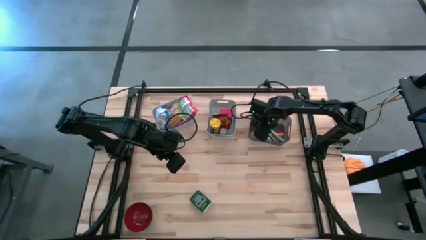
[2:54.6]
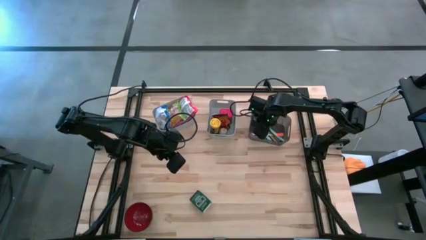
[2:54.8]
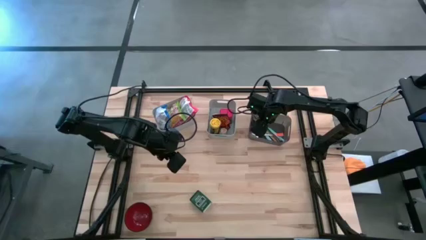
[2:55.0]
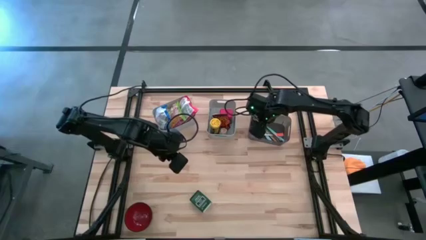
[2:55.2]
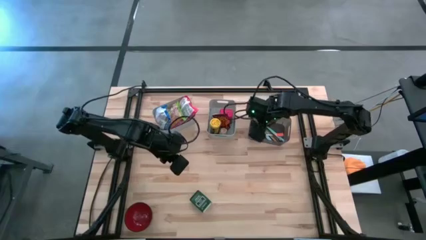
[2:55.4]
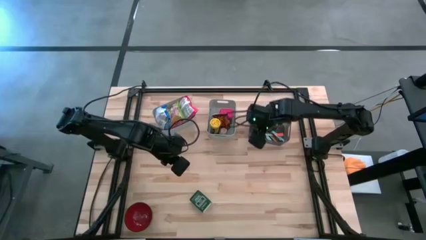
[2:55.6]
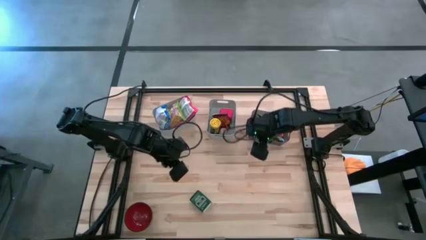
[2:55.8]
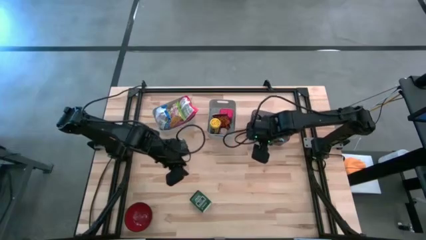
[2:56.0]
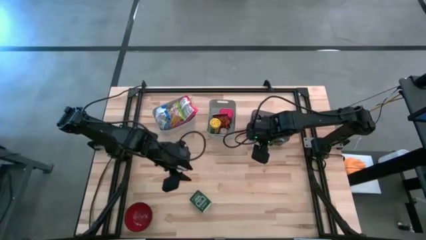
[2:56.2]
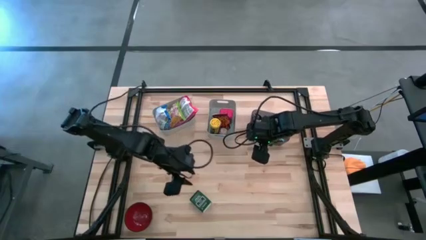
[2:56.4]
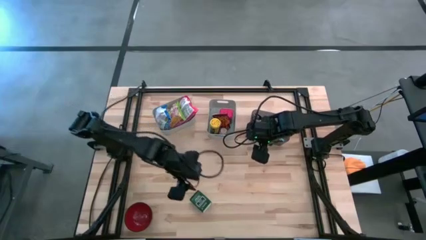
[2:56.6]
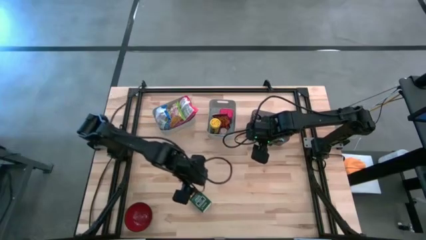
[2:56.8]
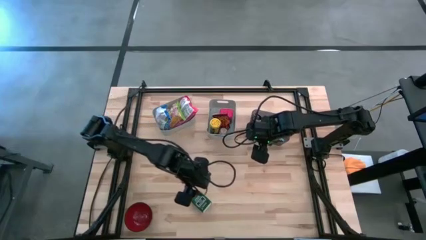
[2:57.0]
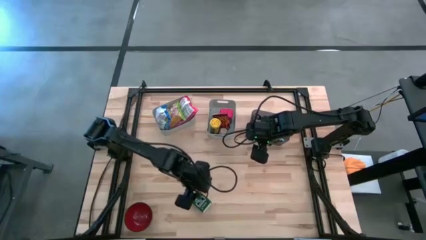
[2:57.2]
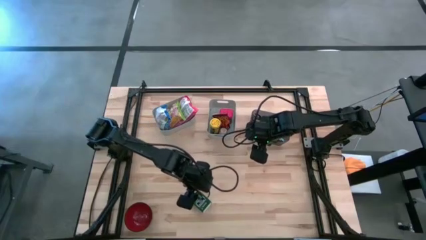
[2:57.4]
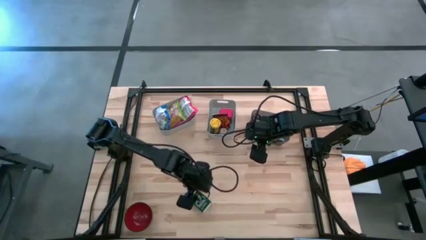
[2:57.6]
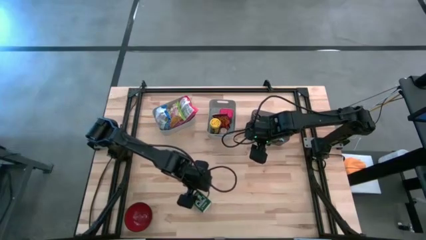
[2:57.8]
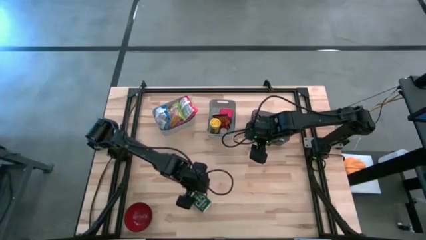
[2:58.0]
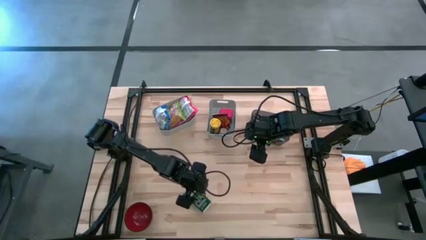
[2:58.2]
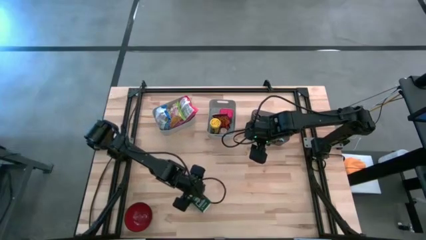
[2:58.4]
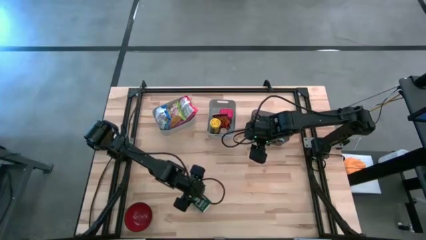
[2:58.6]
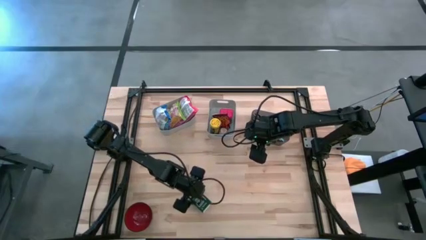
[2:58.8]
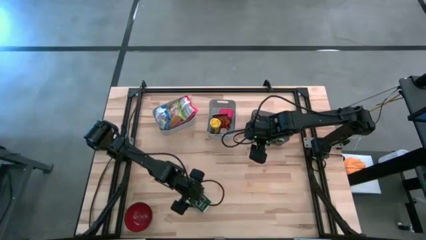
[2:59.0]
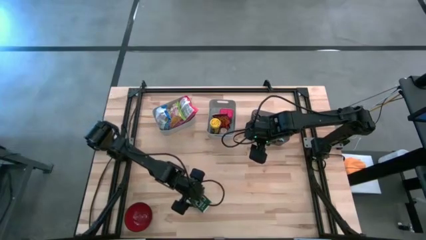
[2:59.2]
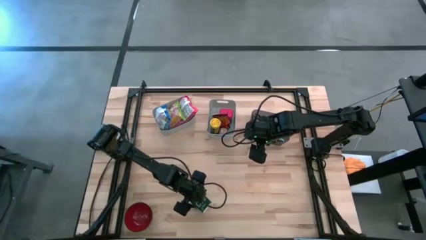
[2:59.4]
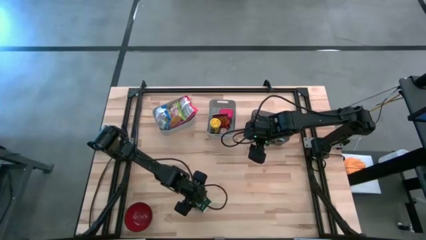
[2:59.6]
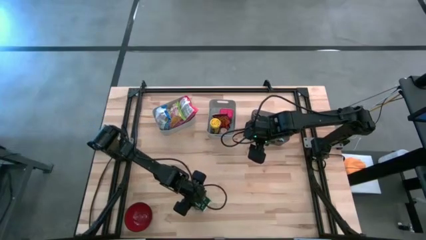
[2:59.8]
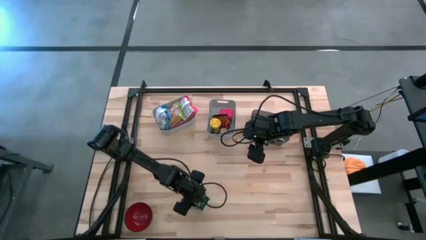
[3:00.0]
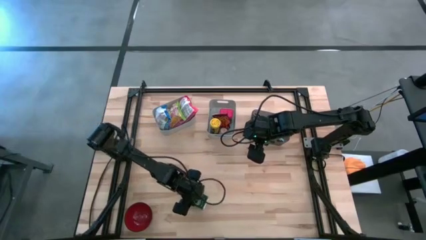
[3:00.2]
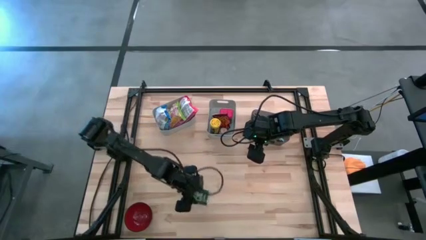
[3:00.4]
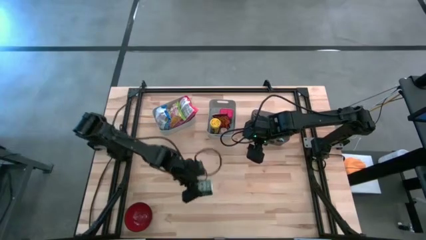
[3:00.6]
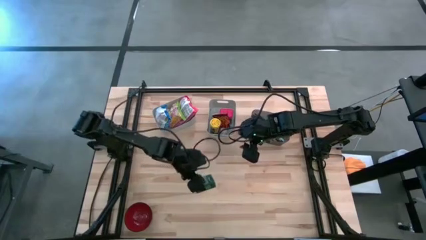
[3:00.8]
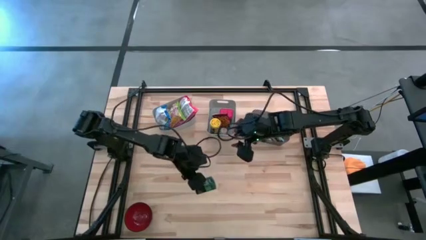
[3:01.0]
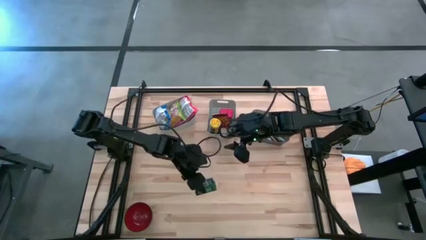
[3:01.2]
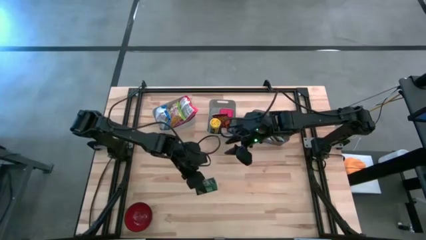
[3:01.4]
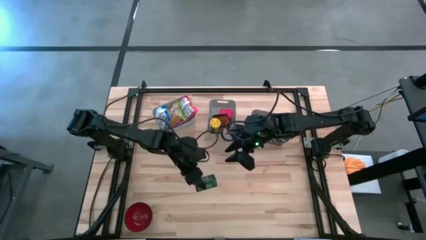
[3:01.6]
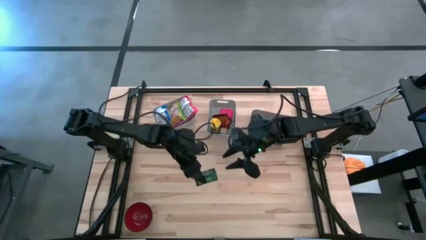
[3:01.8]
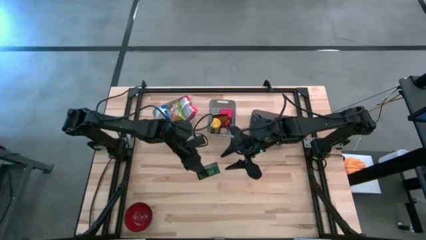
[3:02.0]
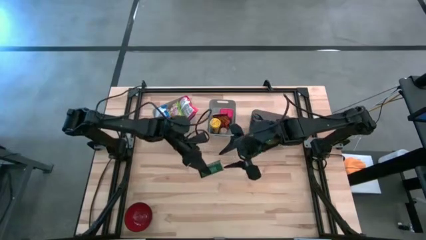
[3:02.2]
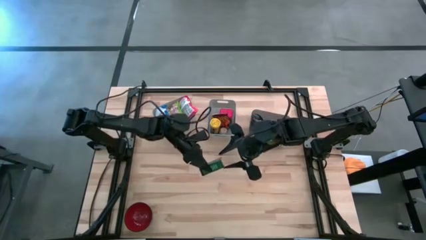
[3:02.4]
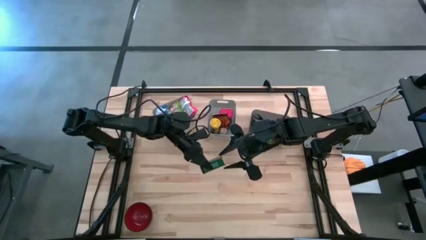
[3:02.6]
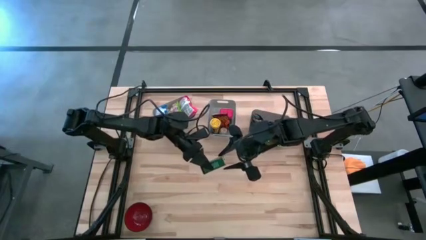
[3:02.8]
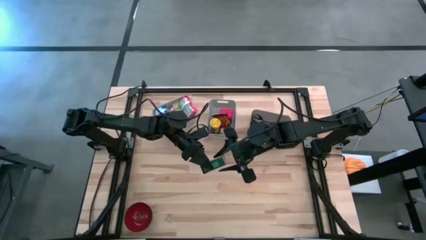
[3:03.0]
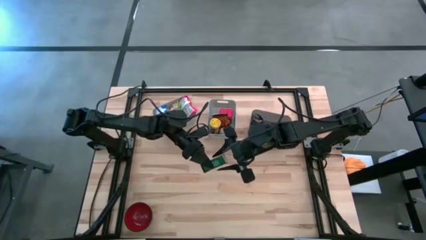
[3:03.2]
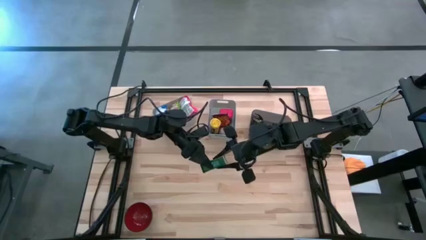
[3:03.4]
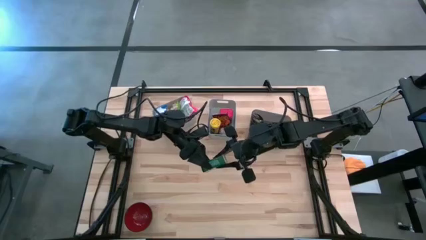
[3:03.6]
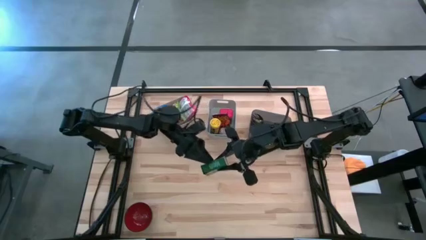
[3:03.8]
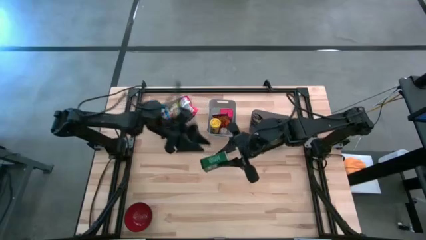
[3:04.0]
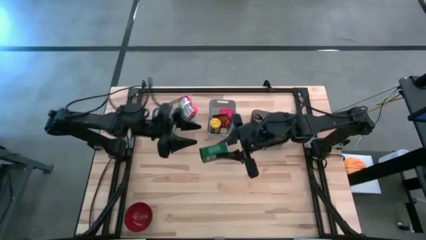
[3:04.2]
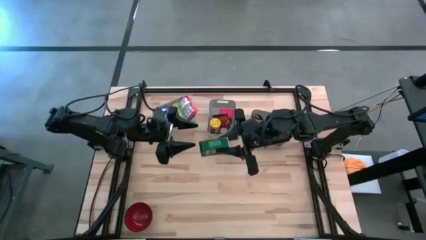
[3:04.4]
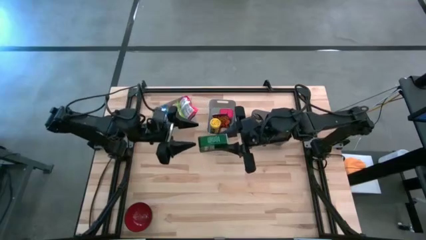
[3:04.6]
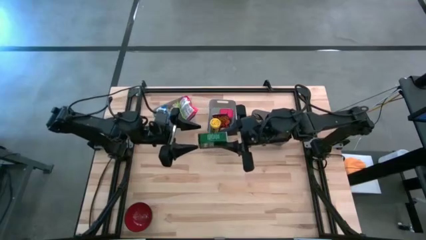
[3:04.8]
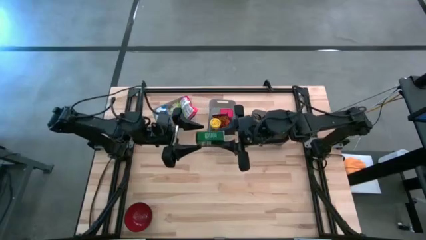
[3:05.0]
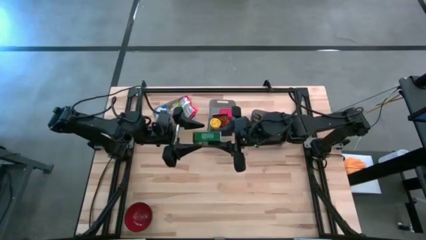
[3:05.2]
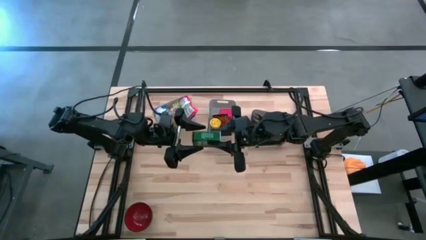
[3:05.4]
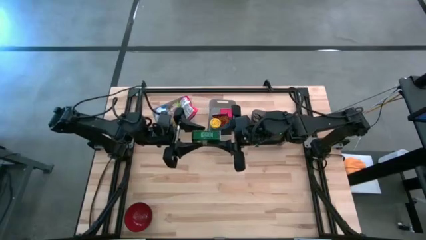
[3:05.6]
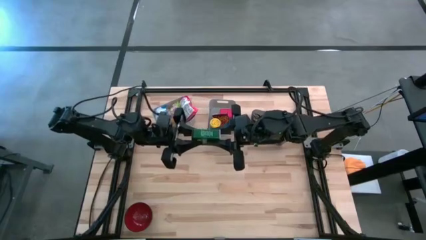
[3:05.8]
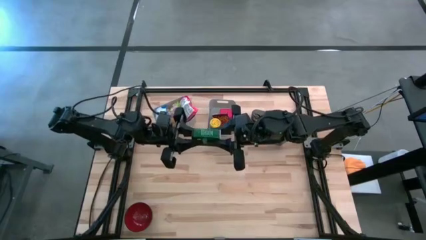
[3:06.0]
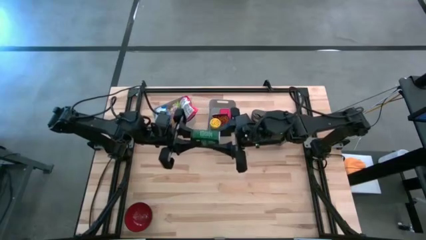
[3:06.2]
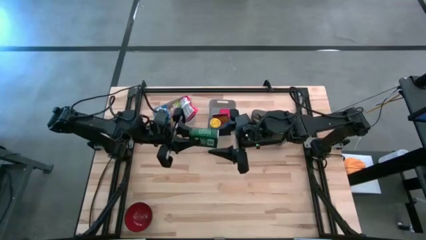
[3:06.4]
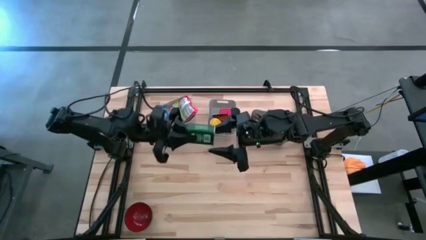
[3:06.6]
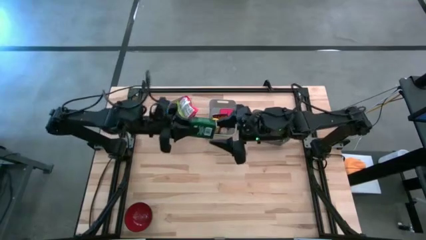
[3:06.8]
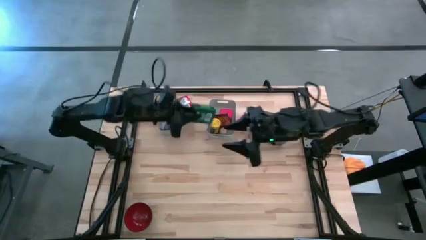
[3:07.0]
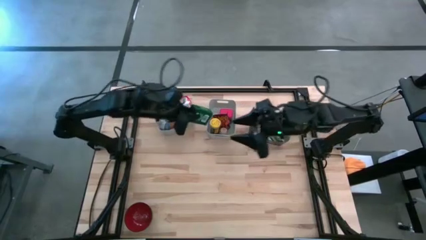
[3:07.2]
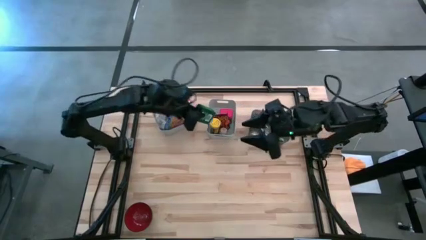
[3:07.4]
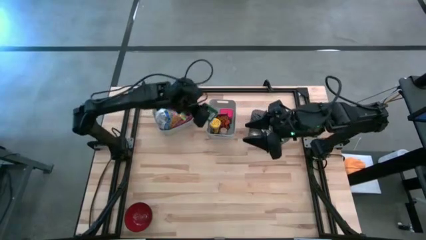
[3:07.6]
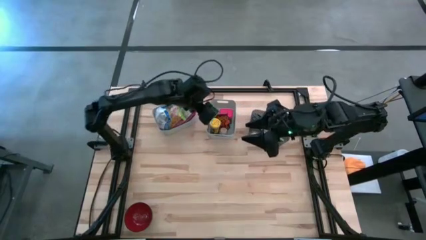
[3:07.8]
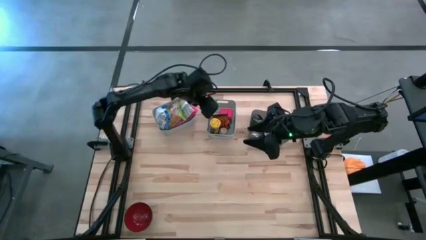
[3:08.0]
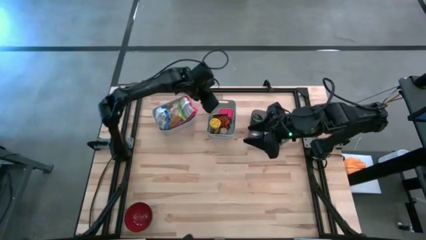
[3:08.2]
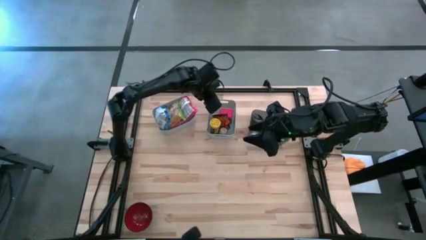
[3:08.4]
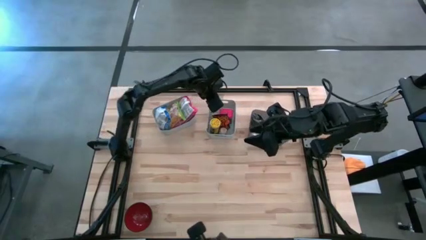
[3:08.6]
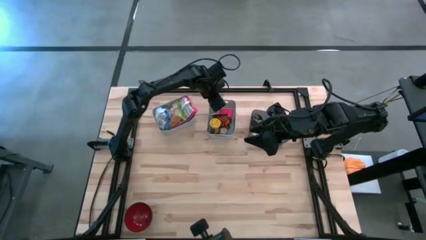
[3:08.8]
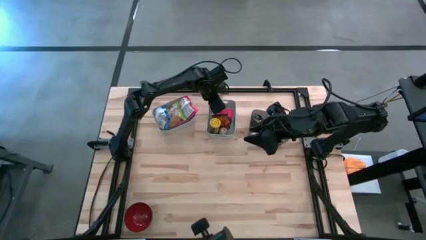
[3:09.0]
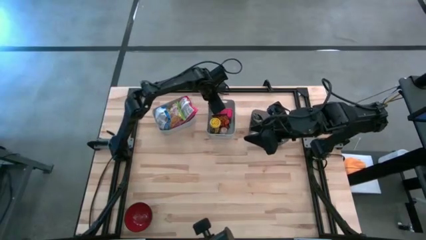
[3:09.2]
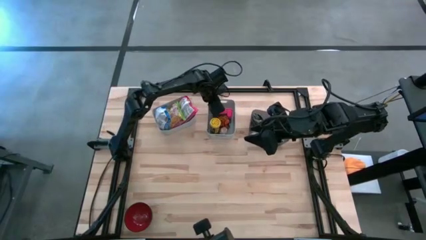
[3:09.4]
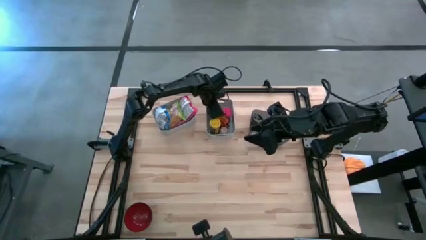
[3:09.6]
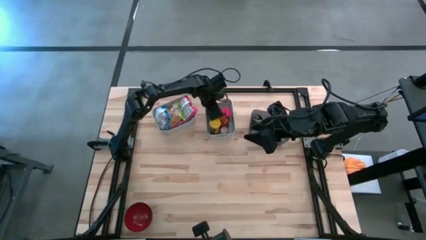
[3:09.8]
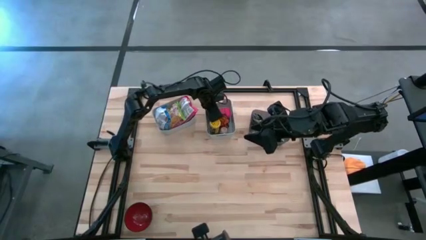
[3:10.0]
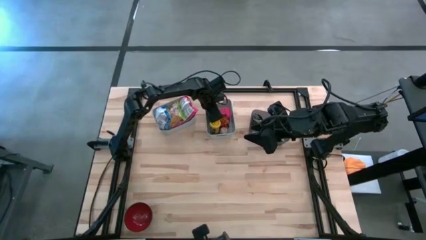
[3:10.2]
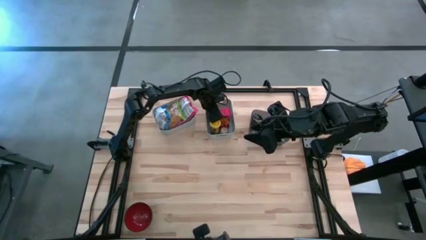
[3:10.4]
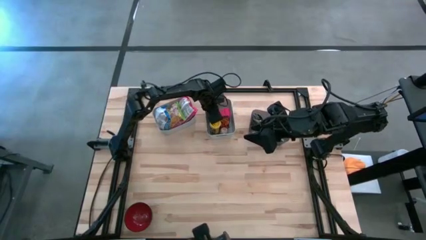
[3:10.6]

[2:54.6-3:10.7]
Put the black seasoning can into the right gray bin
